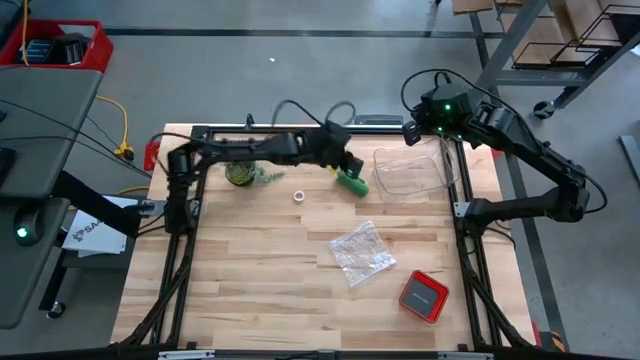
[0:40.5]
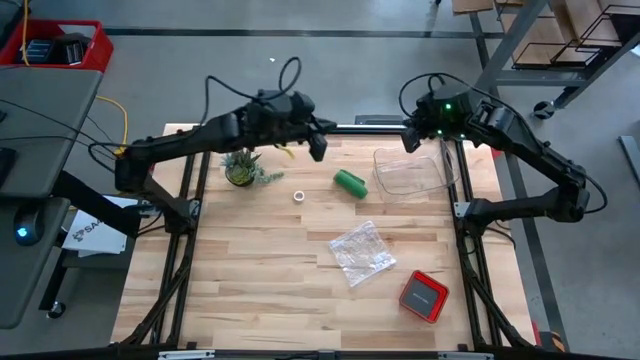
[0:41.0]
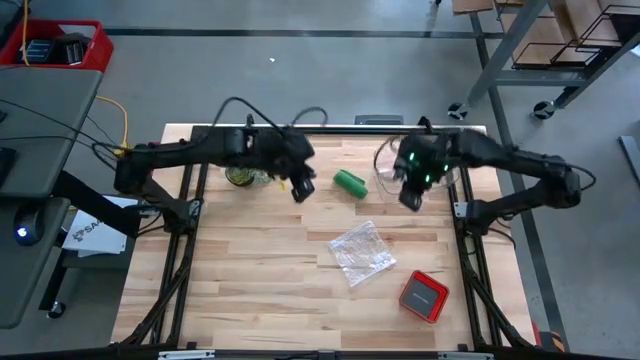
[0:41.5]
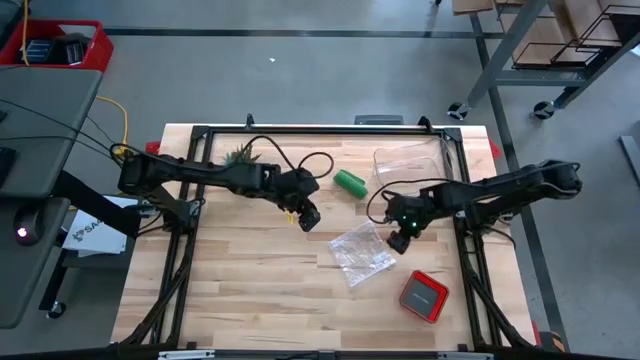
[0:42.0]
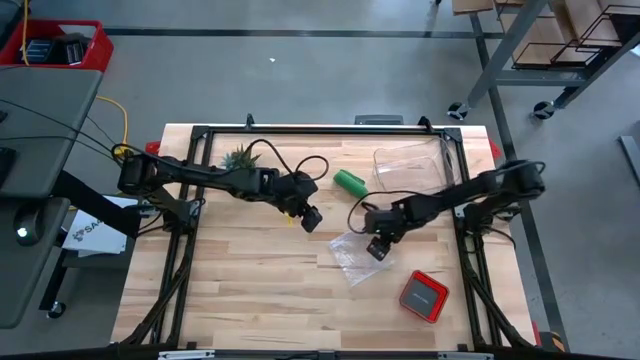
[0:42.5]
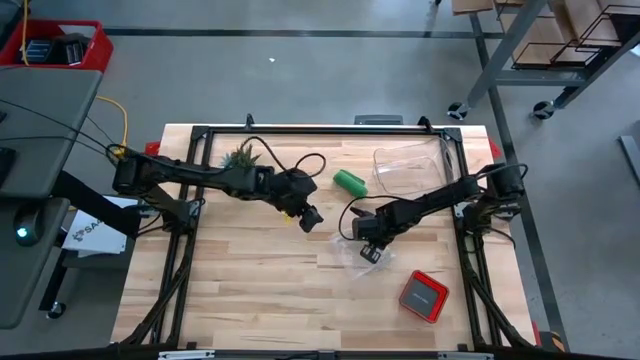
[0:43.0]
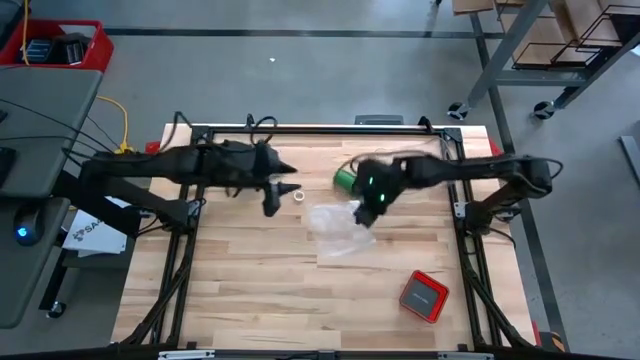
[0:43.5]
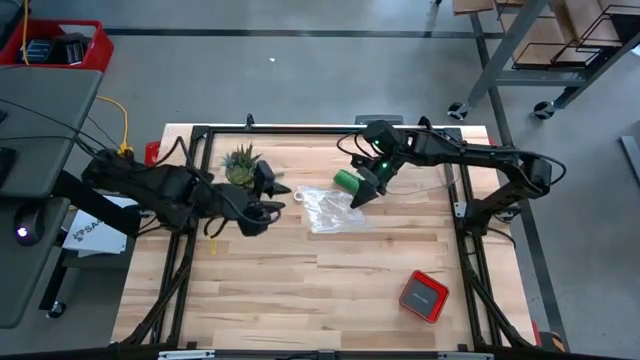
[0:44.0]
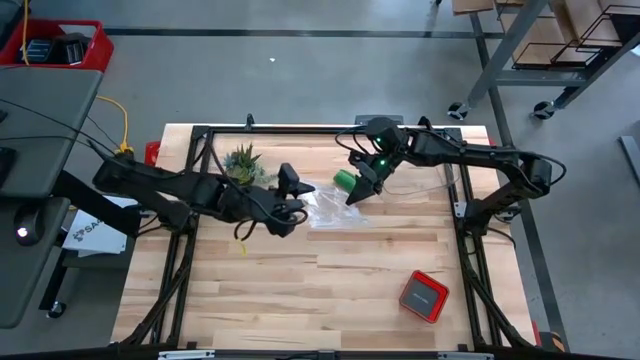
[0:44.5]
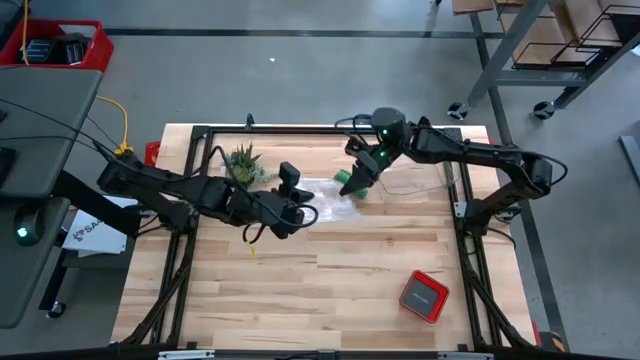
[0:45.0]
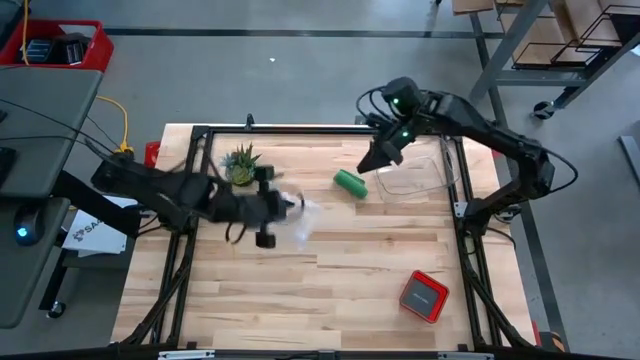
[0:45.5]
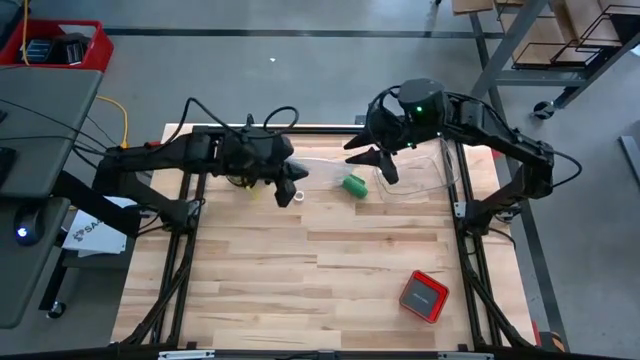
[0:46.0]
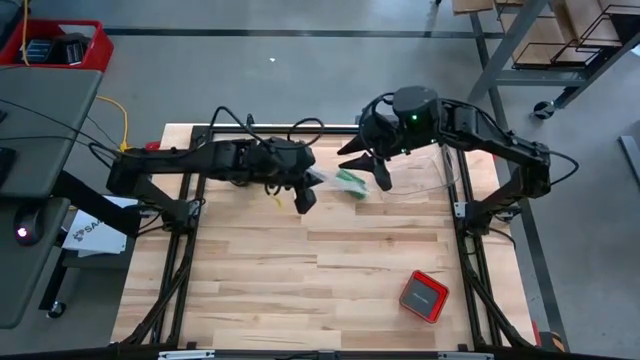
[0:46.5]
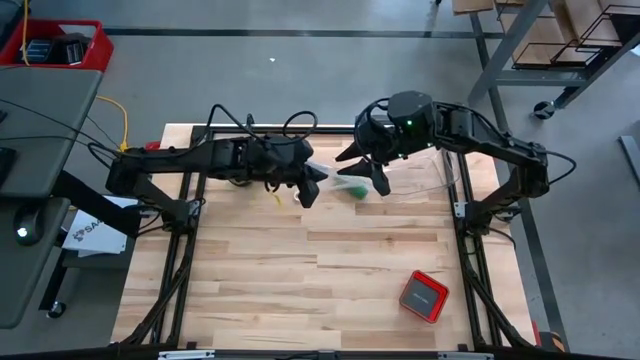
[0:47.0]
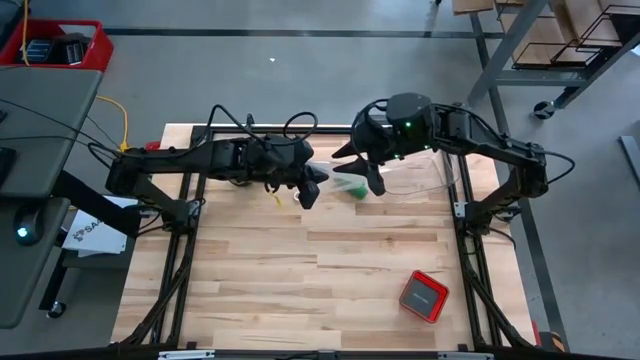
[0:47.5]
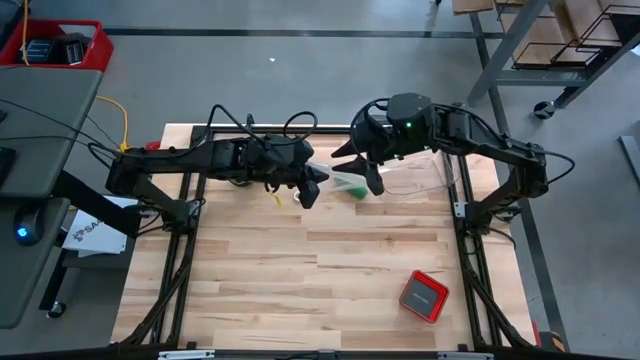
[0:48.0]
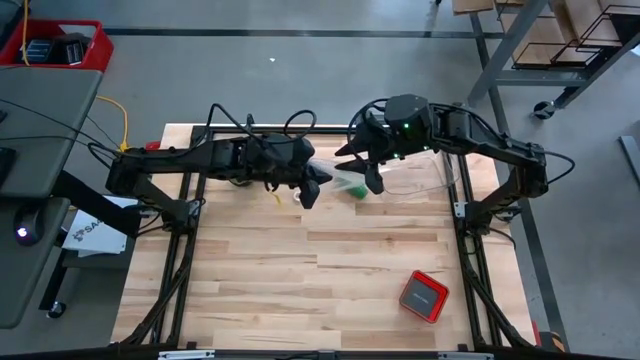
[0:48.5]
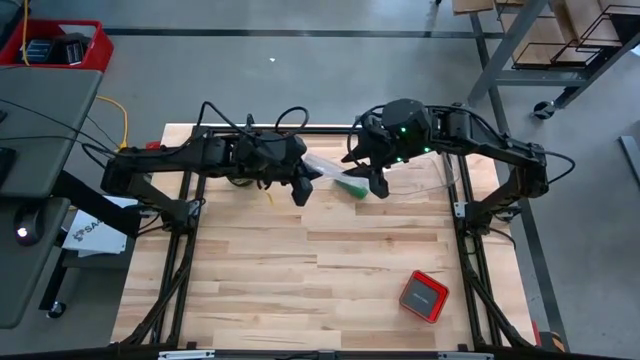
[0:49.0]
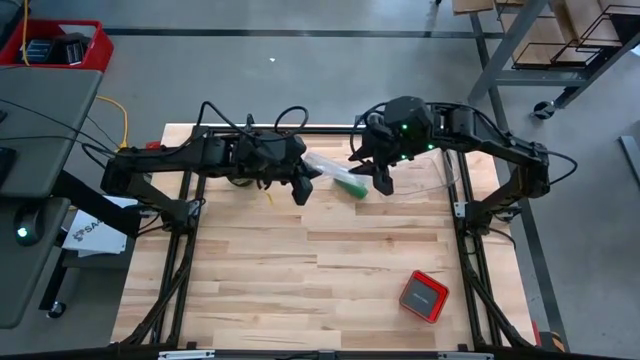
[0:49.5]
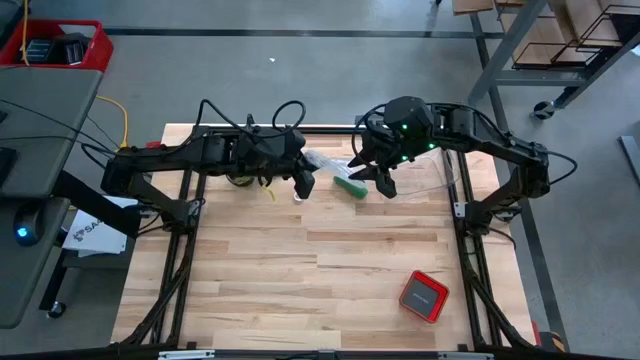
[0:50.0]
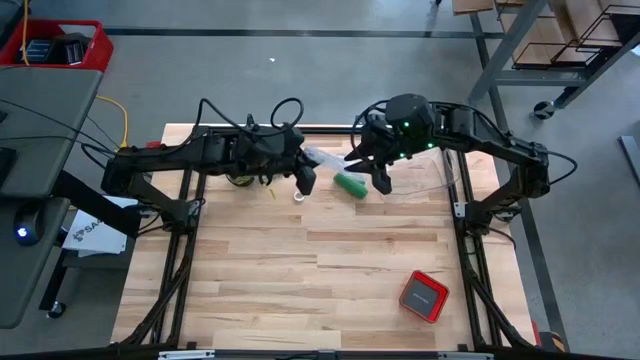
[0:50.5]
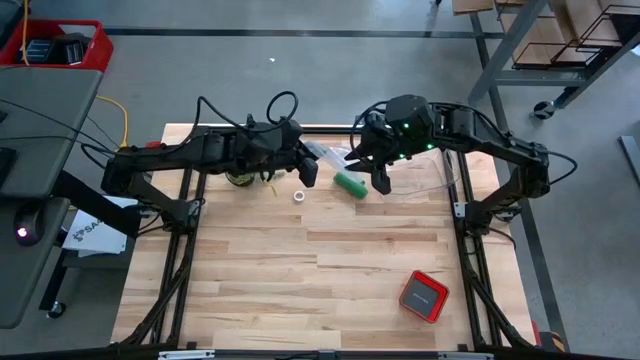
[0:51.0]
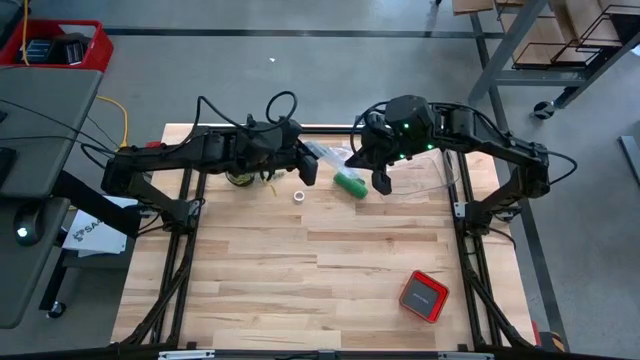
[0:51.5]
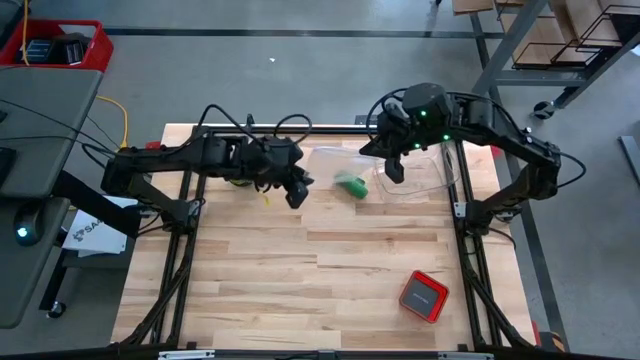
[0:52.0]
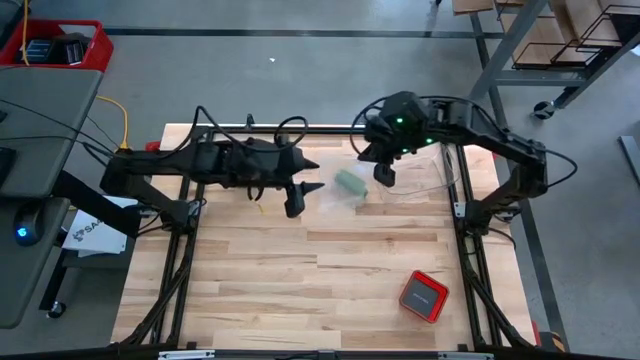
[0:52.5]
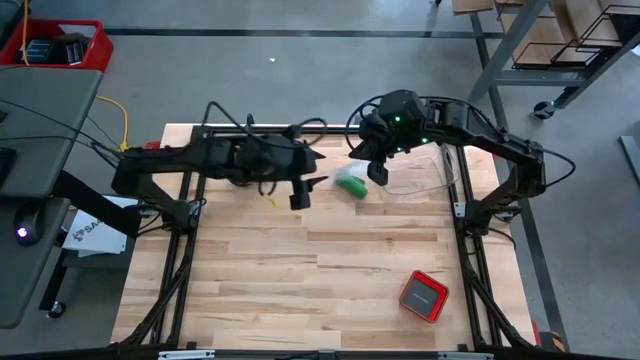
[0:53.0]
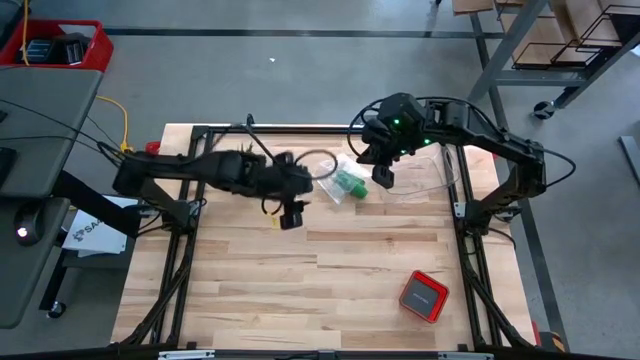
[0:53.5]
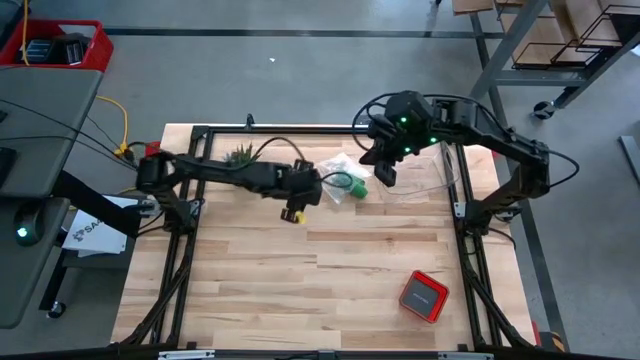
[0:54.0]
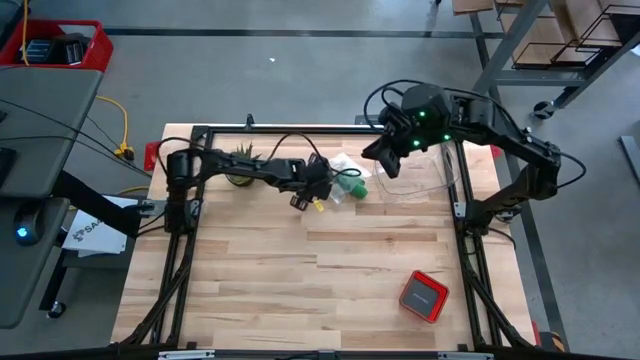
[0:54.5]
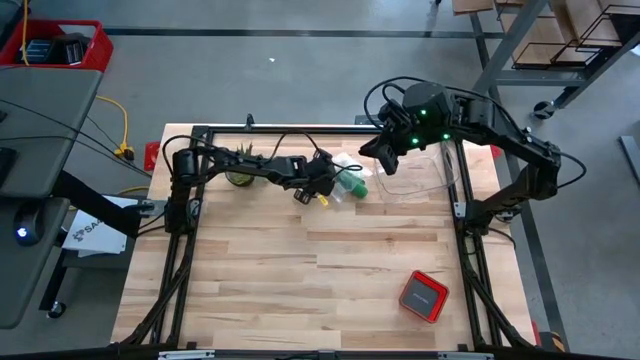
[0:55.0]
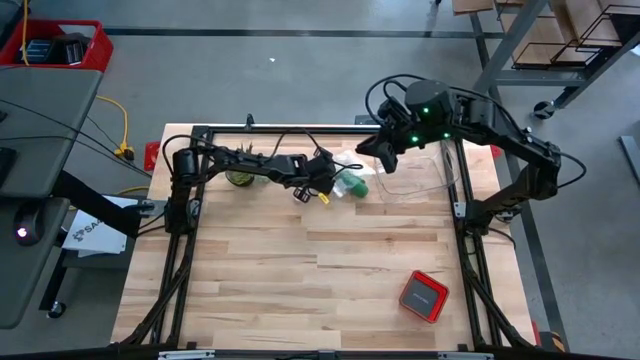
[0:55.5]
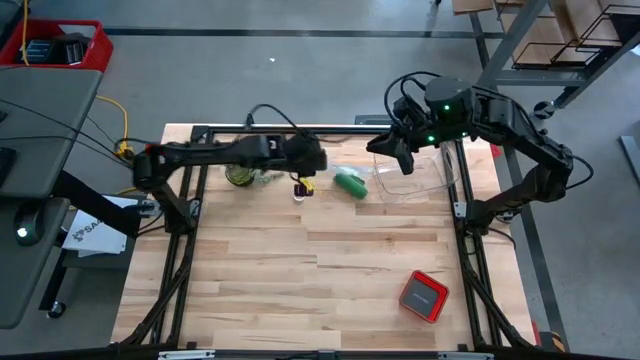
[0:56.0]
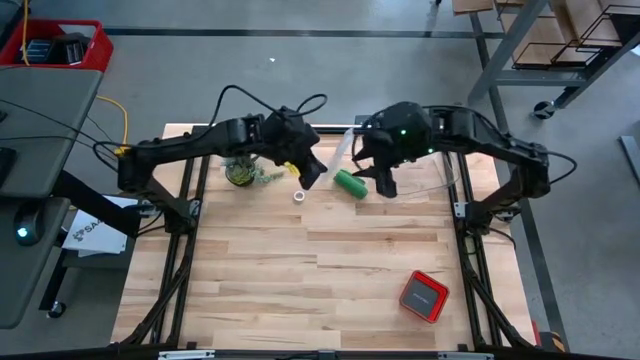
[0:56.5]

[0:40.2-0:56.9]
Task: Roll bandage
Open the transparent zip bag

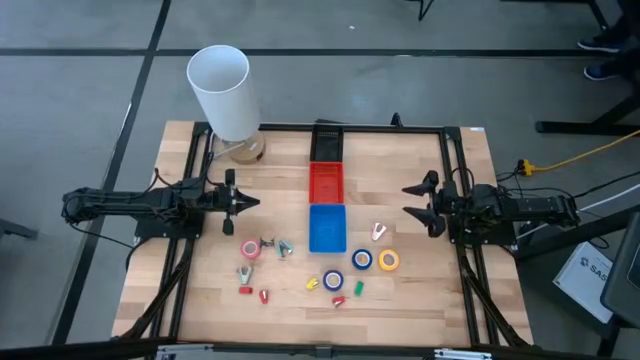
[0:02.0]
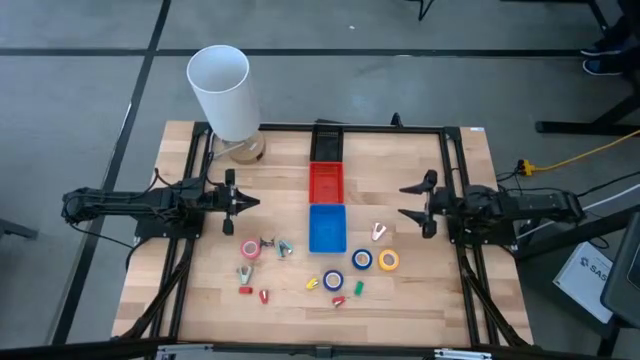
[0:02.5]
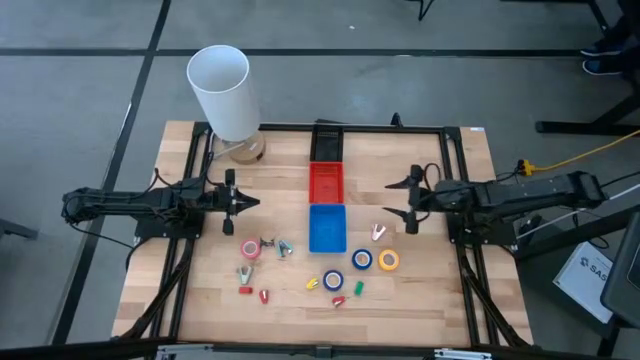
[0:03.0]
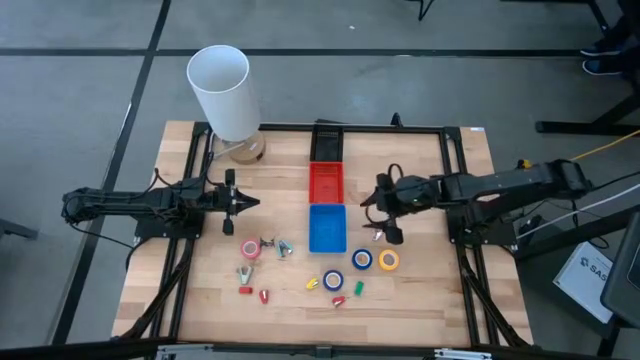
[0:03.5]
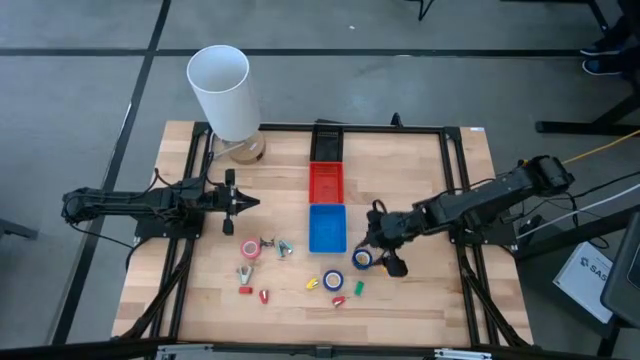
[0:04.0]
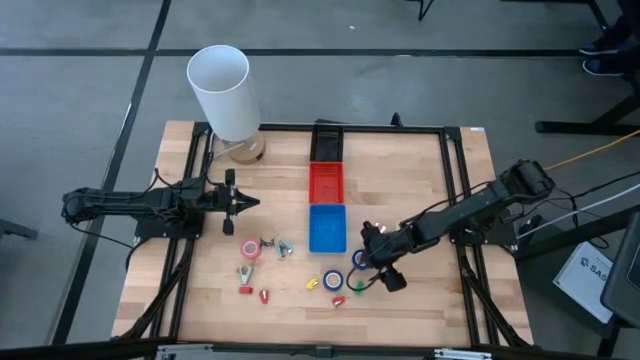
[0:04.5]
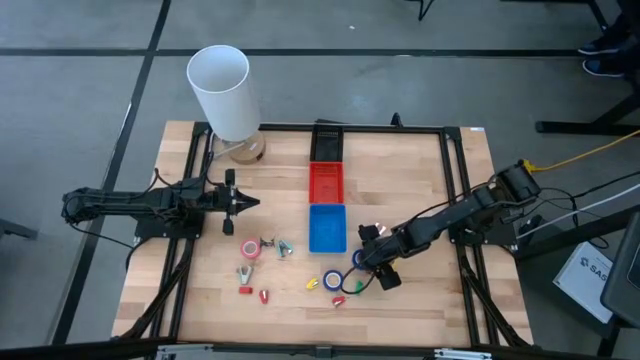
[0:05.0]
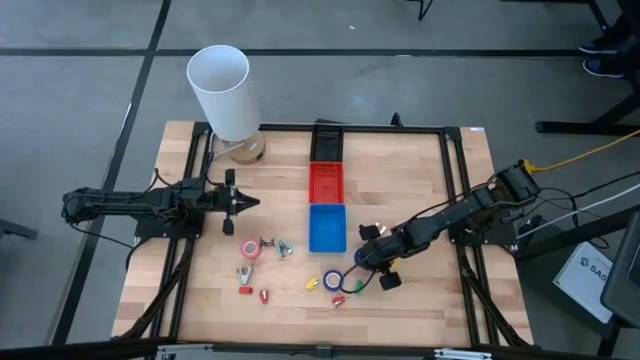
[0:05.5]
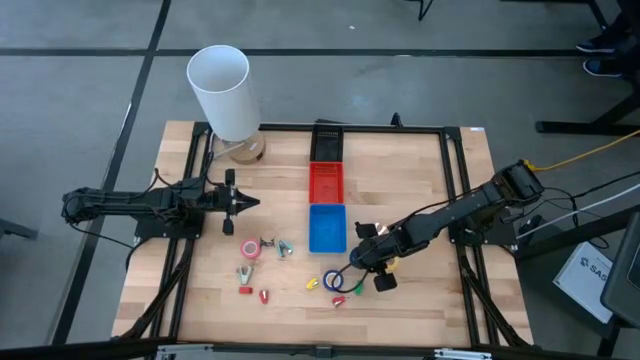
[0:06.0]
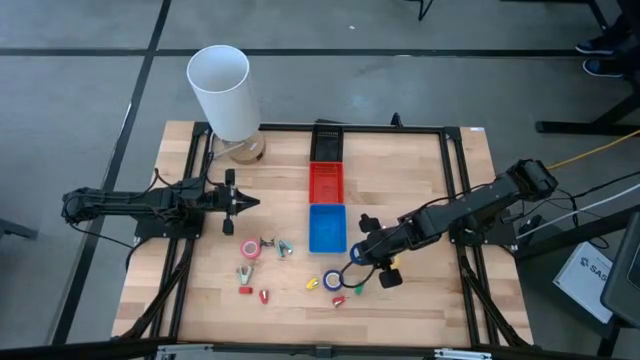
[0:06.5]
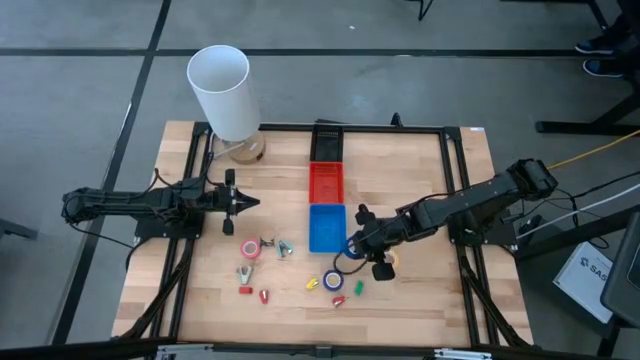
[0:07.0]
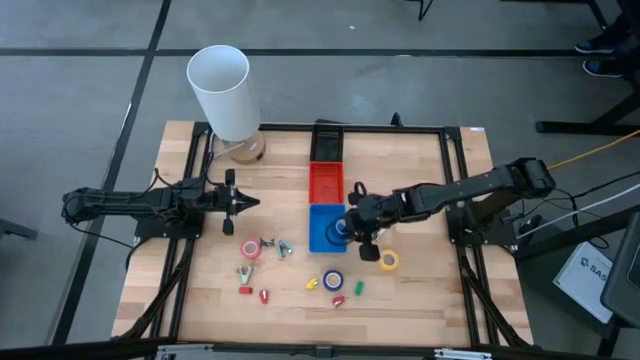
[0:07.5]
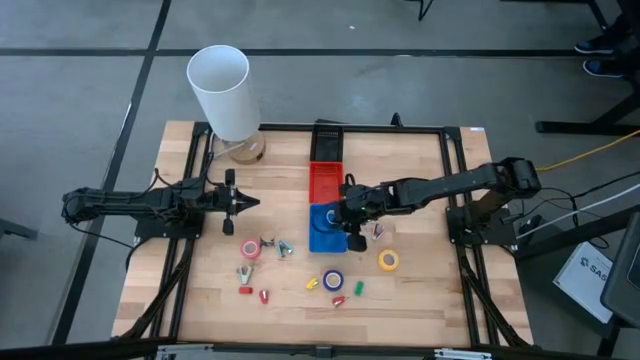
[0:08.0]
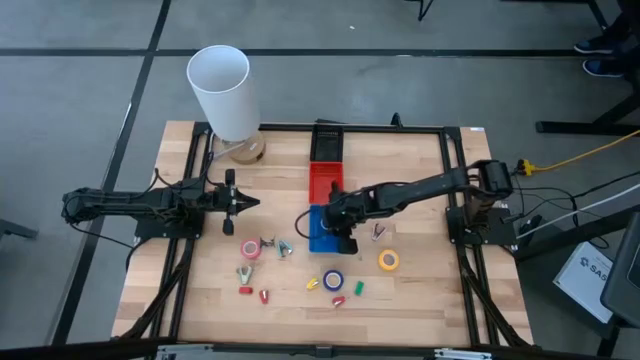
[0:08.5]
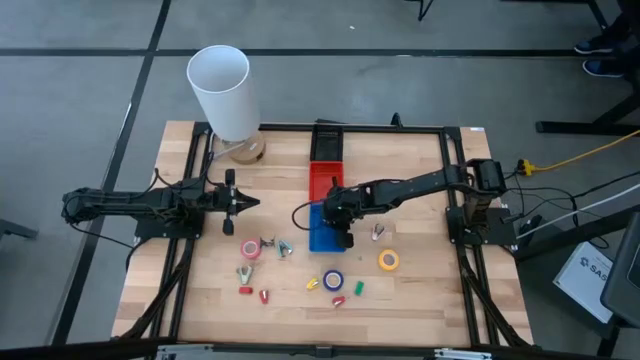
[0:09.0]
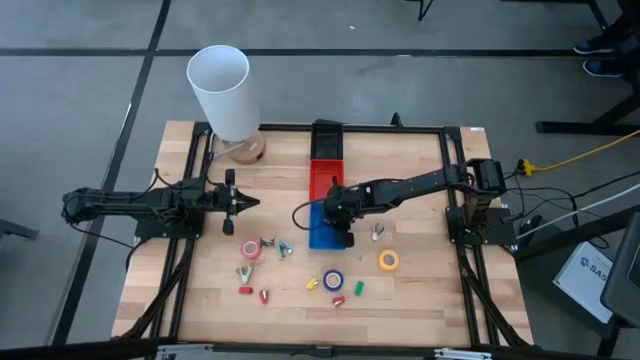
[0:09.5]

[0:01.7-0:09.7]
Task: Pick and place Stapler, Stapler remover, tape
Put the top blue tape into the blue bin
